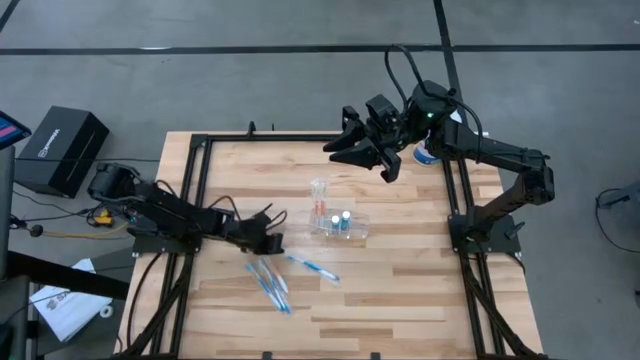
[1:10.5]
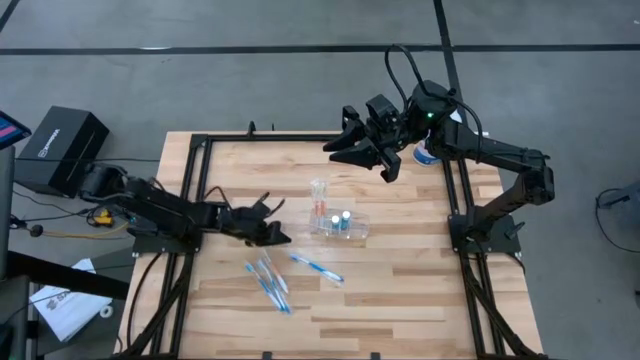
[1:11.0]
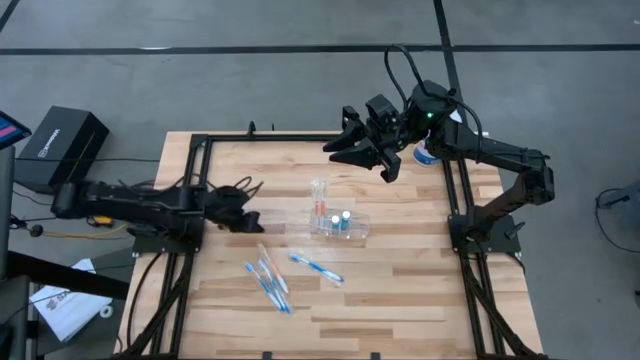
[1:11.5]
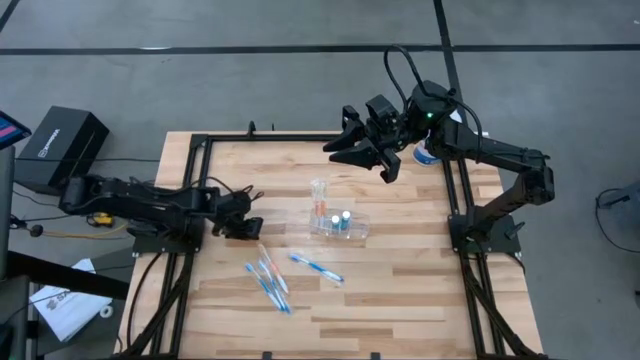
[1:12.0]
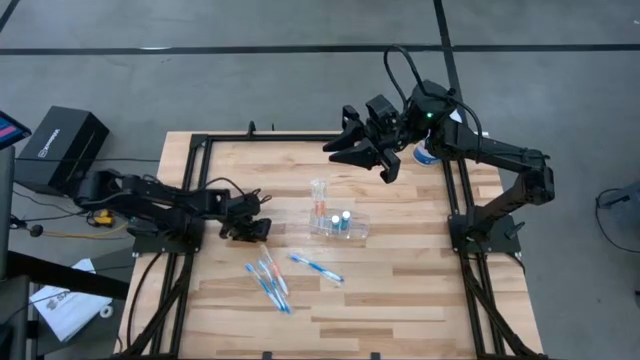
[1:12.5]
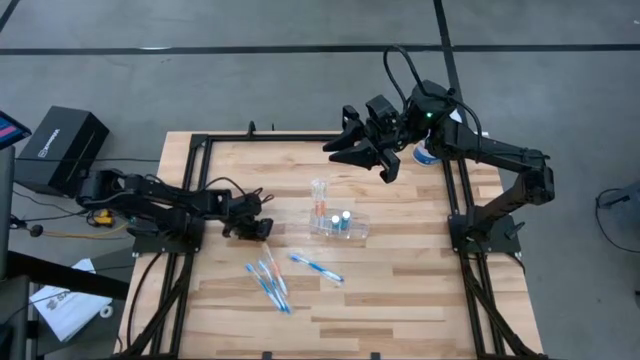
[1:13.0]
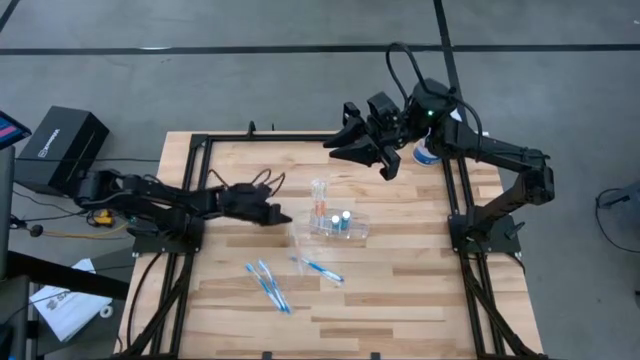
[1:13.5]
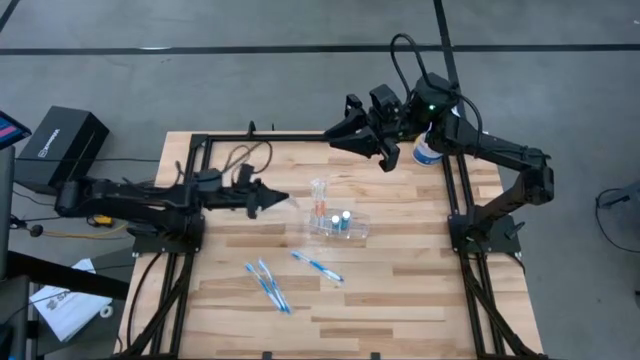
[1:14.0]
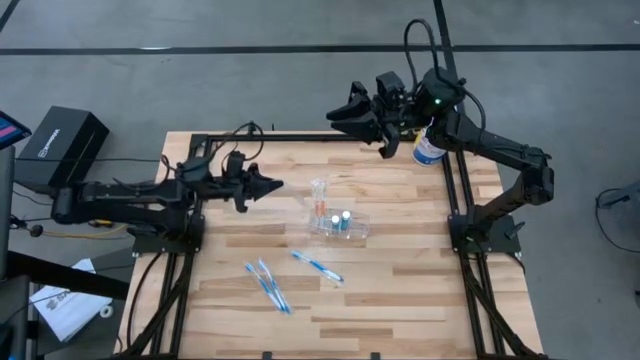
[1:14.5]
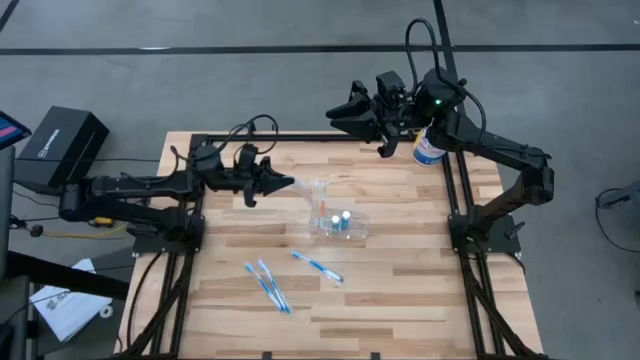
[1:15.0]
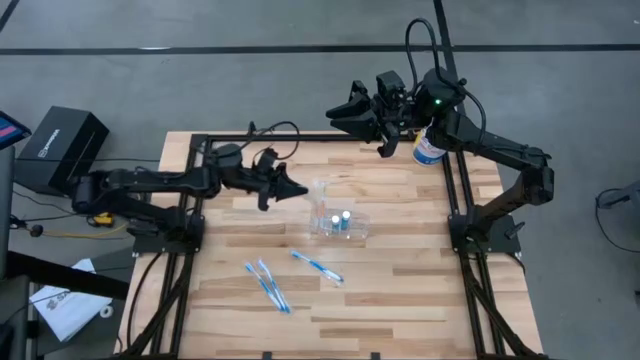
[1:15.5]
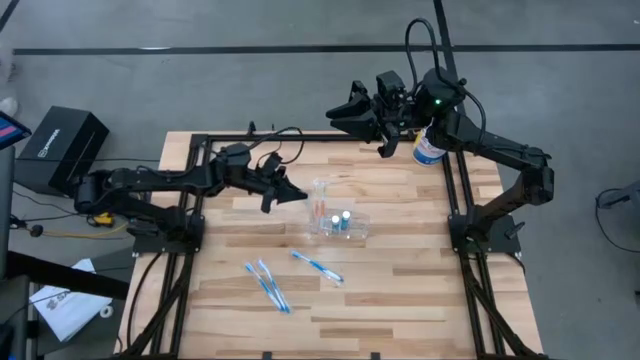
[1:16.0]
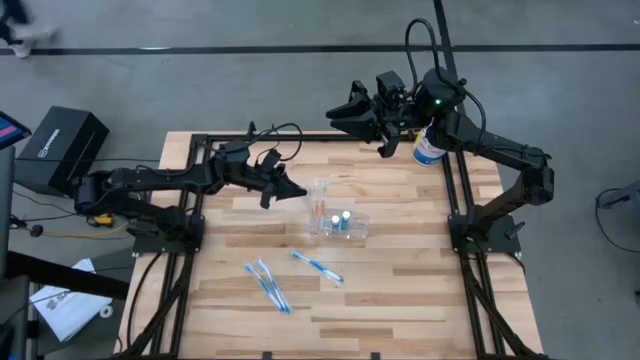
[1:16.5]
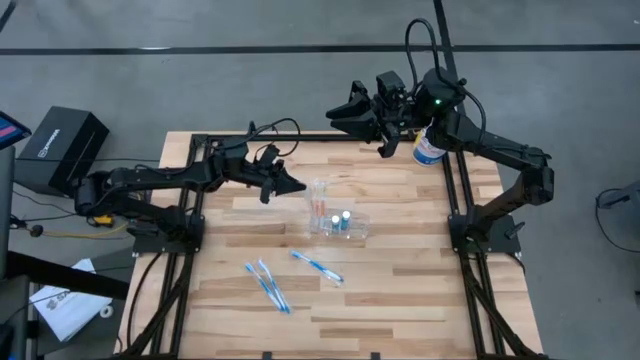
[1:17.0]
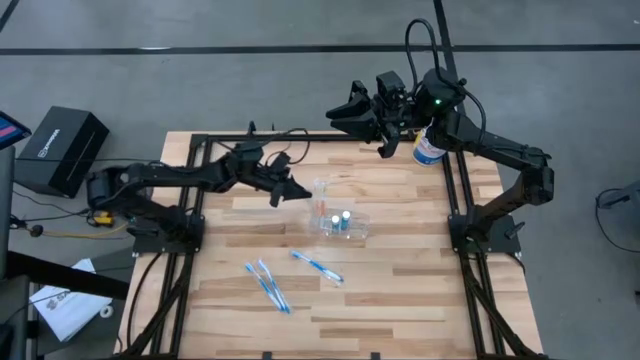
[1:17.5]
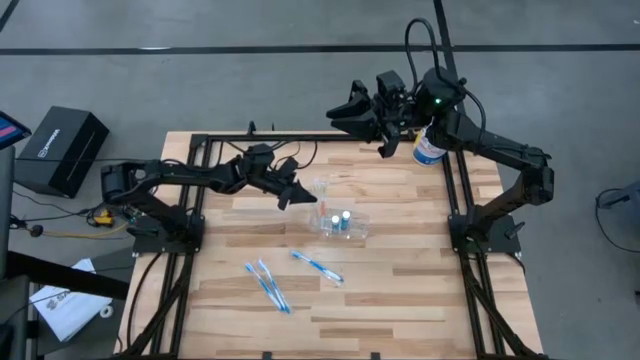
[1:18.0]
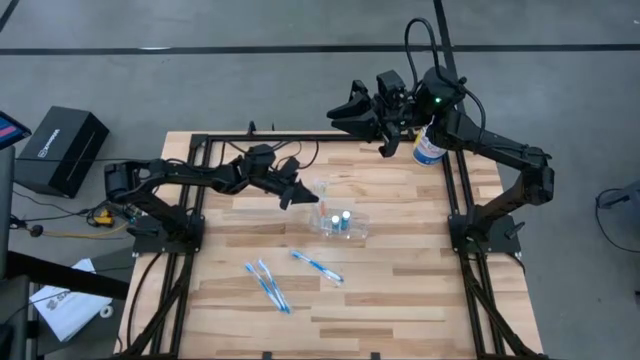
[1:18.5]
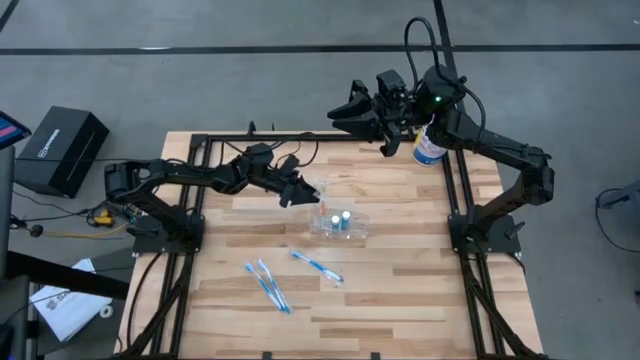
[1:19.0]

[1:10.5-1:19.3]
Task: Pick & Place toothbrushing station
Put the orange toothbrush into the transparent organizer

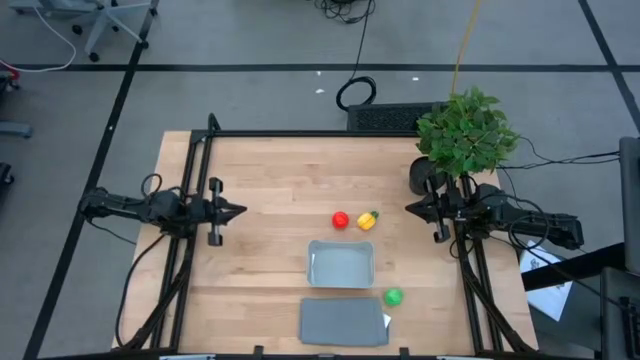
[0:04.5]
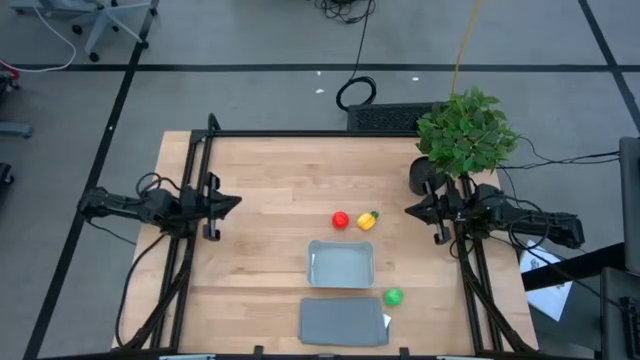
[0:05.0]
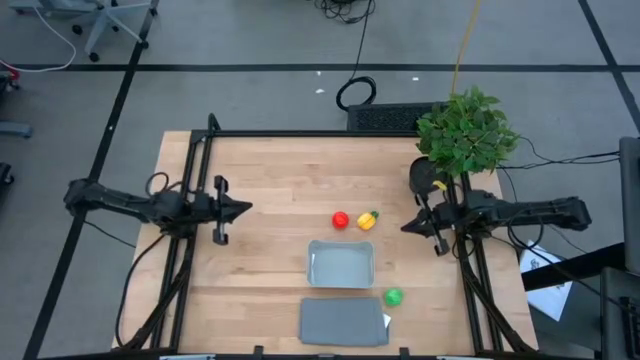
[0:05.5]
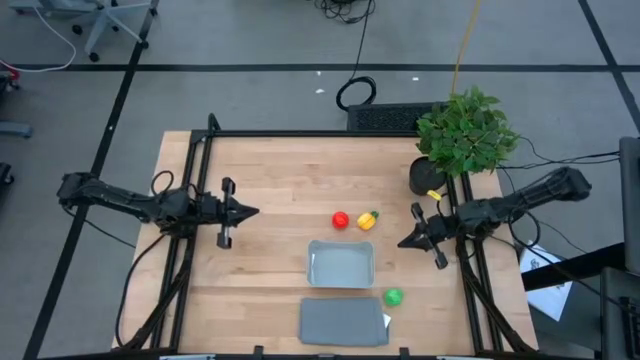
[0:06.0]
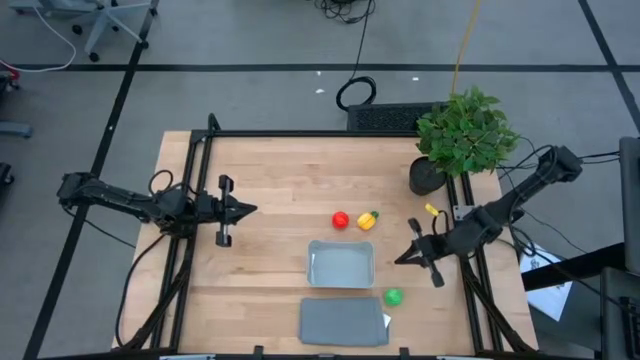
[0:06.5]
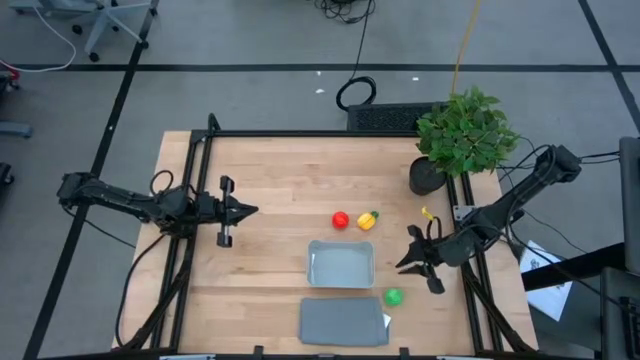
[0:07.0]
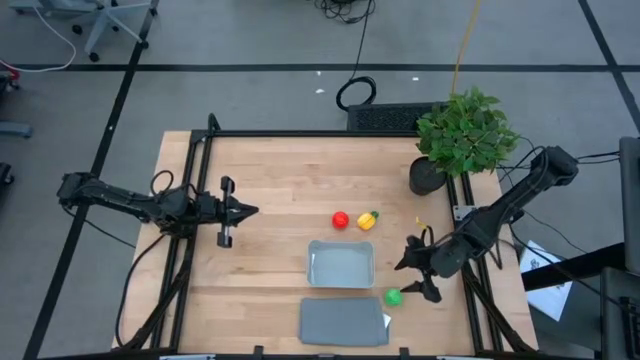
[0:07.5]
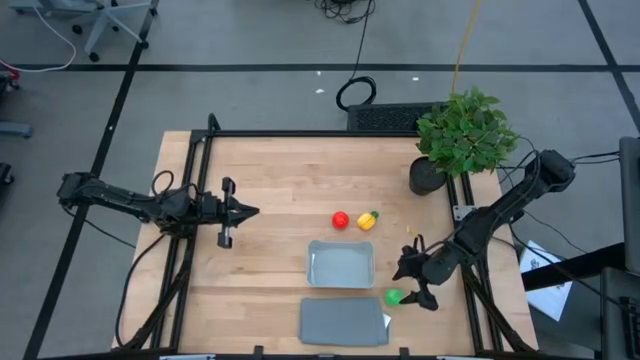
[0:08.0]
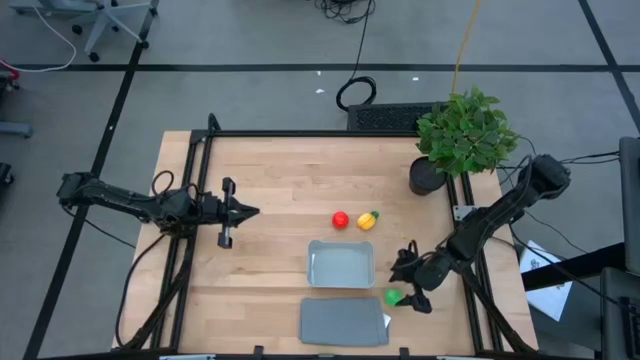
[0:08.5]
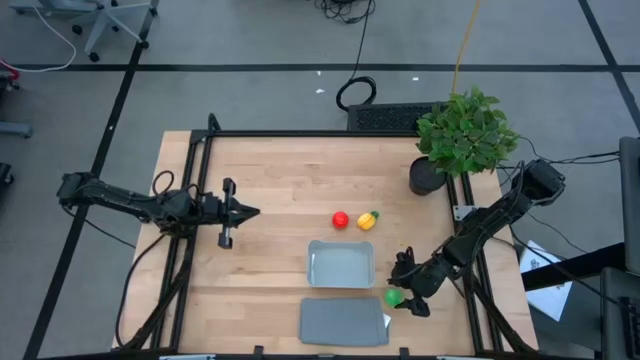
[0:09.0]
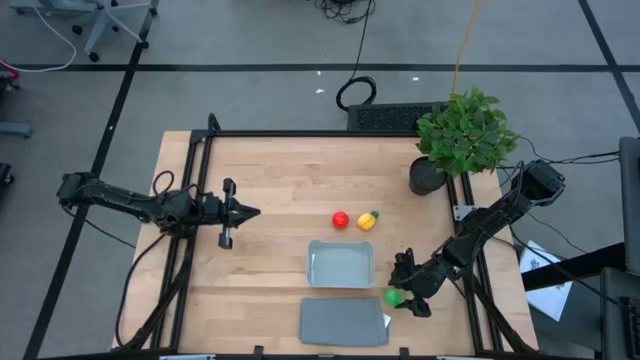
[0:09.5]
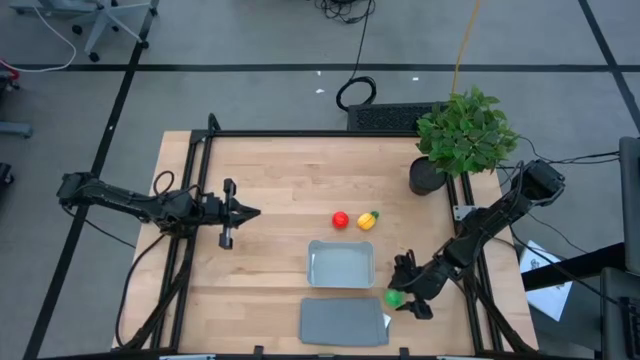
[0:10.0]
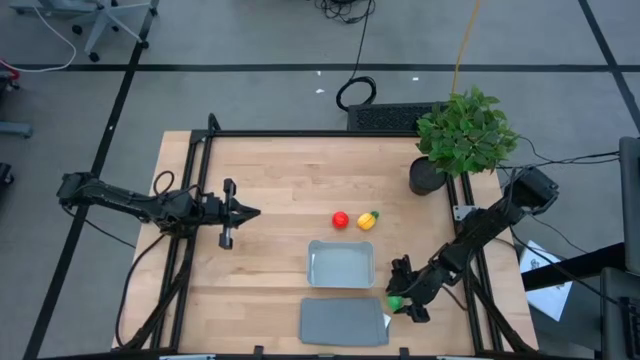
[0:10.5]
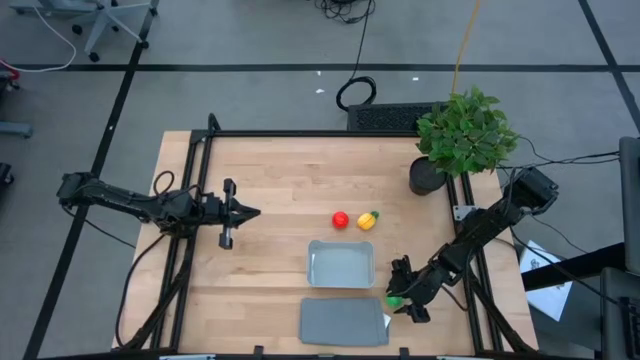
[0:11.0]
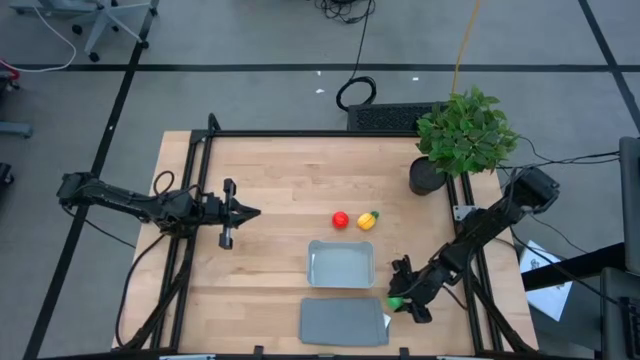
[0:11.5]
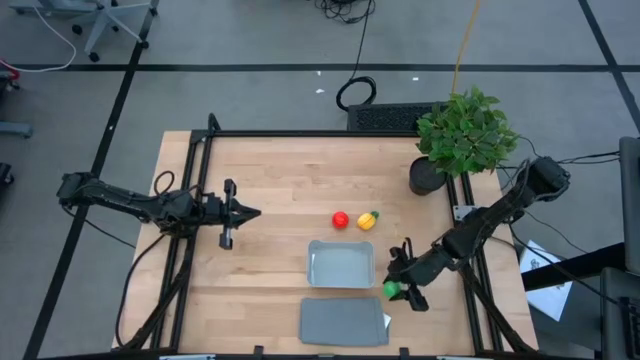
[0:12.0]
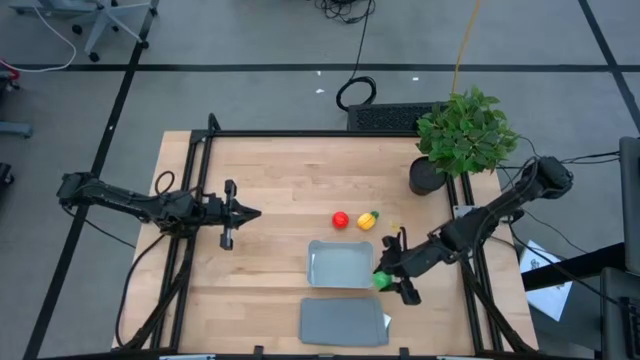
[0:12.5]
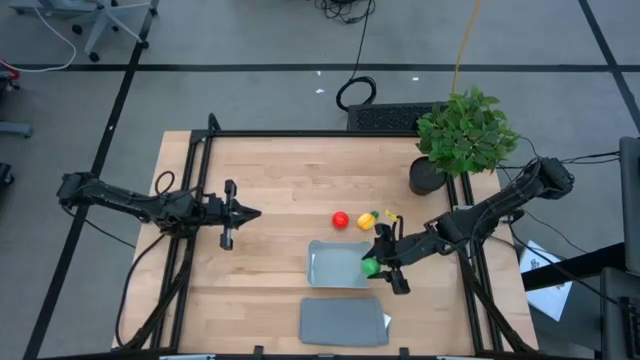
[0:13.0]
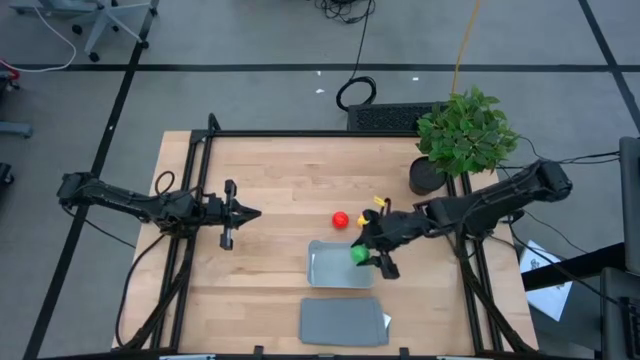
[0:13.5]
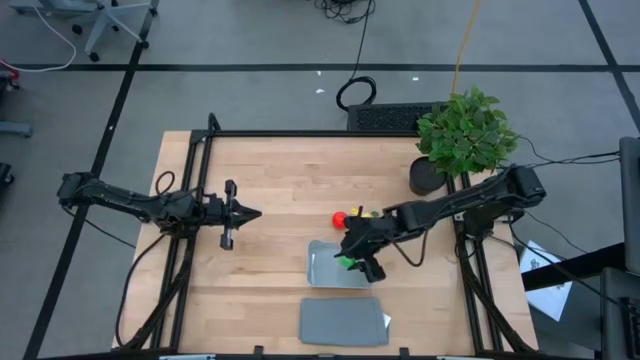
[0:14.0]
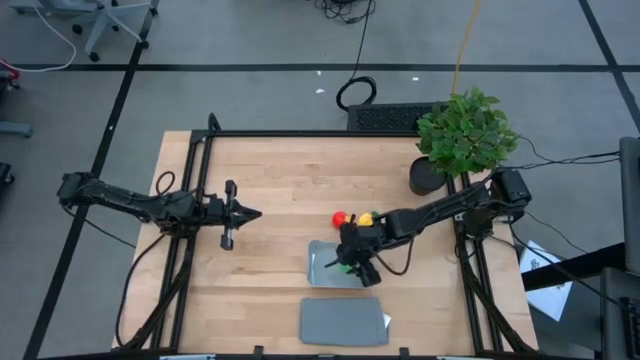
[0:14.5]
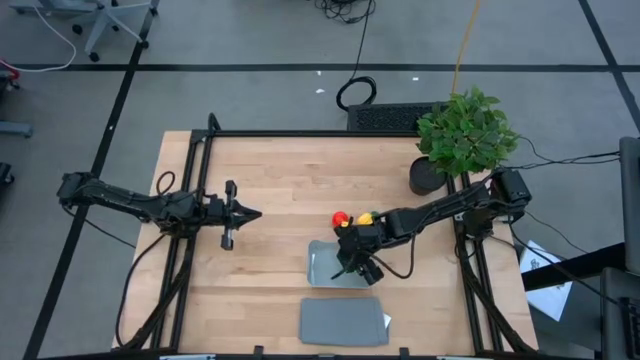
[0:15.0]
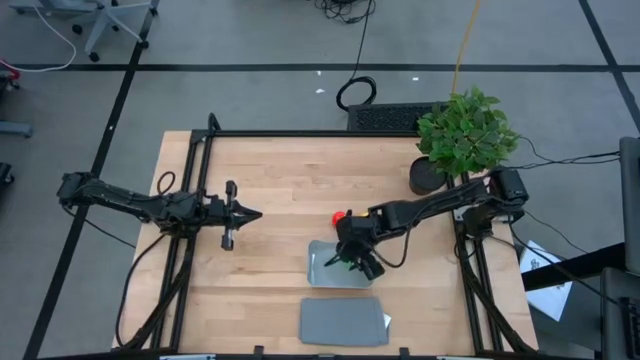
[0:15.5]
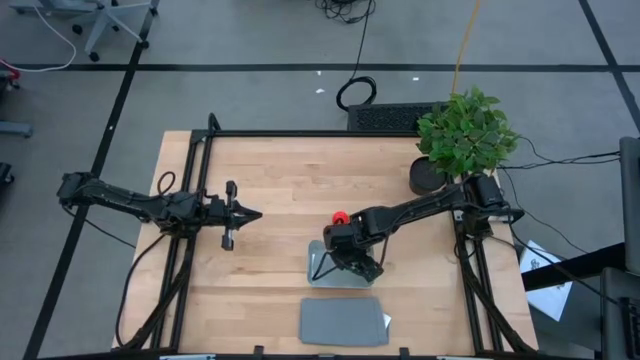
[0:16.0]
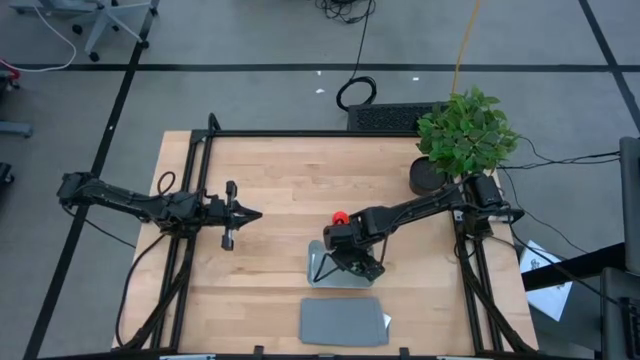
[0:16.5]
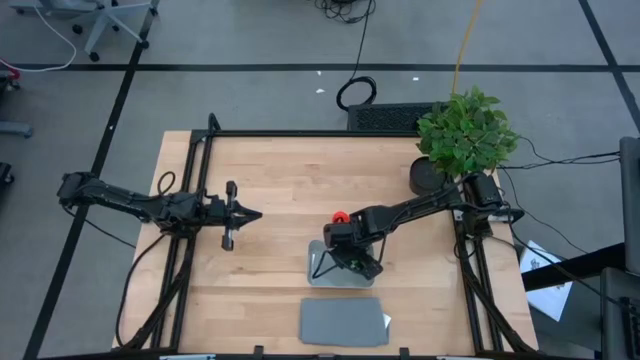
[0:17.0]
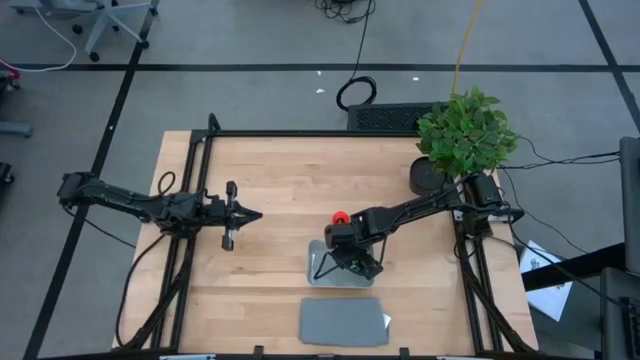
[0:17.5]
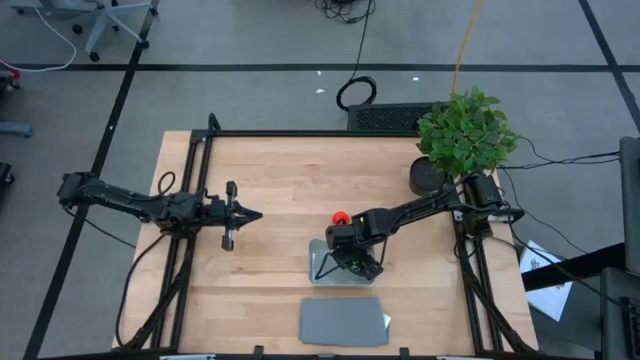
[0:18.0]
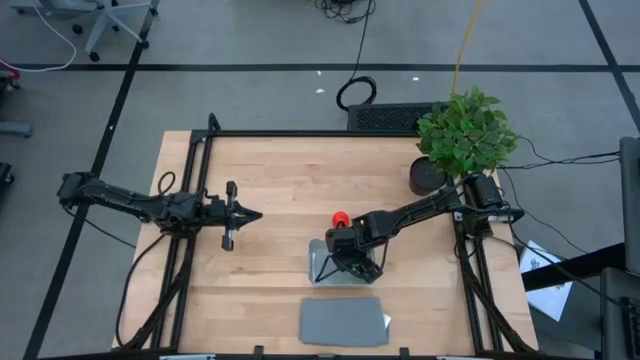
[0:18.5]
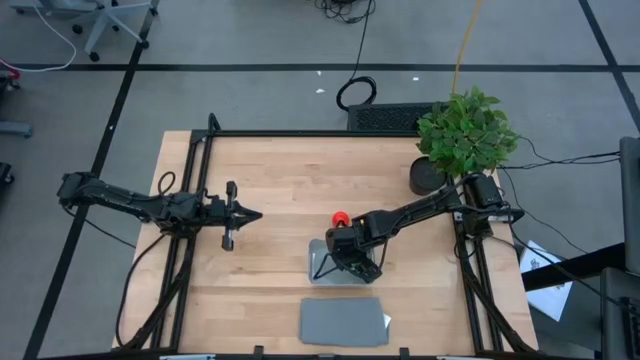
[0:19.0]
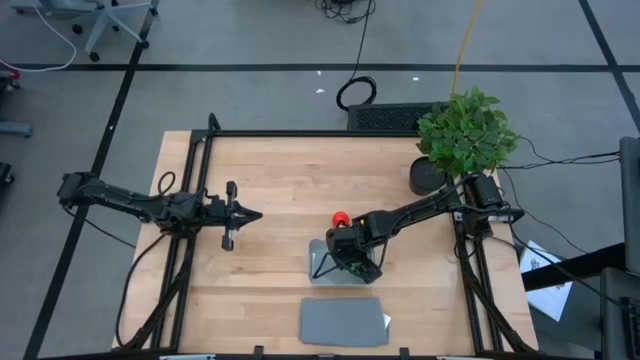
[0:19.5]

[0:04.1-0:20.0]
Task: Pick and placing Produce into tupperware
Put the green avocado into the gray bin
